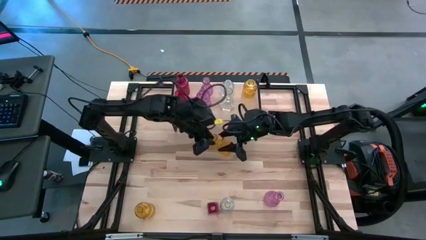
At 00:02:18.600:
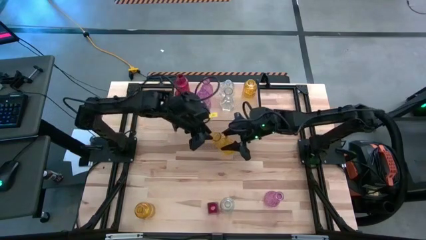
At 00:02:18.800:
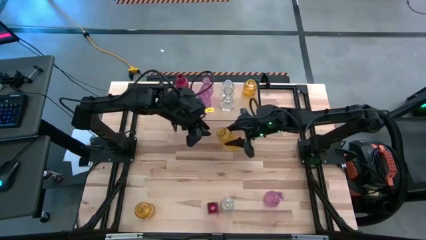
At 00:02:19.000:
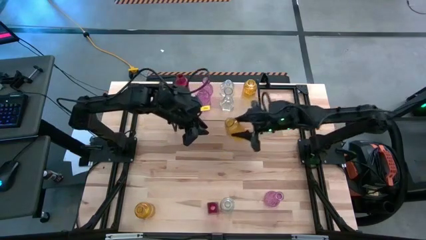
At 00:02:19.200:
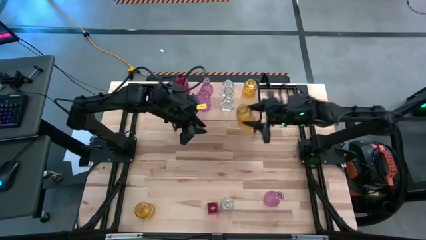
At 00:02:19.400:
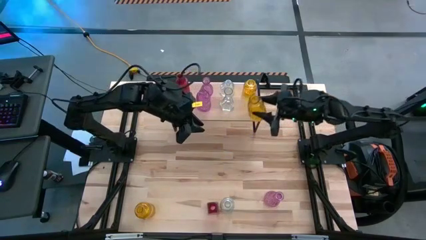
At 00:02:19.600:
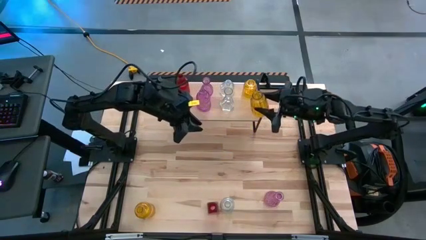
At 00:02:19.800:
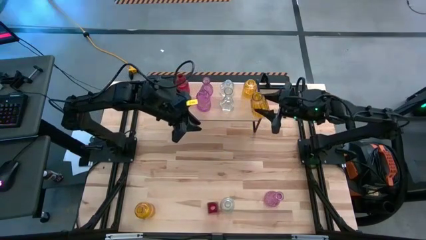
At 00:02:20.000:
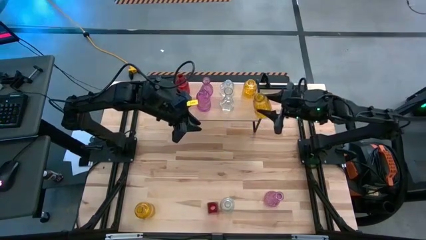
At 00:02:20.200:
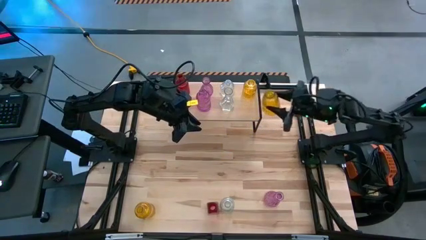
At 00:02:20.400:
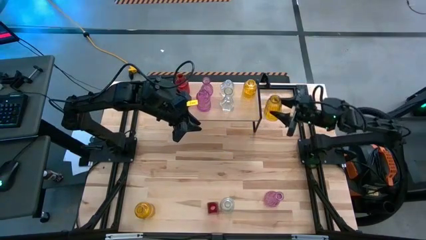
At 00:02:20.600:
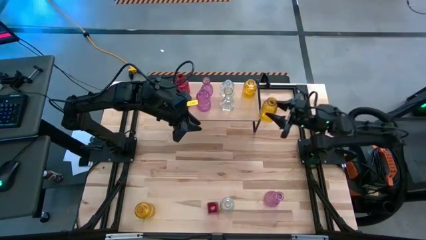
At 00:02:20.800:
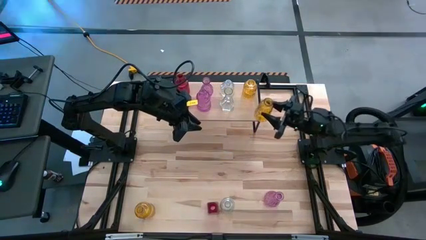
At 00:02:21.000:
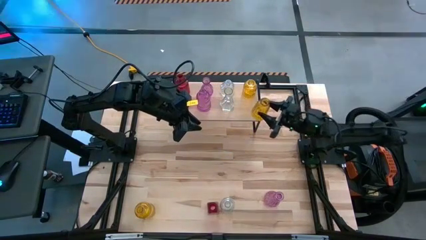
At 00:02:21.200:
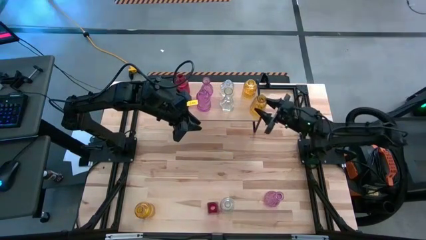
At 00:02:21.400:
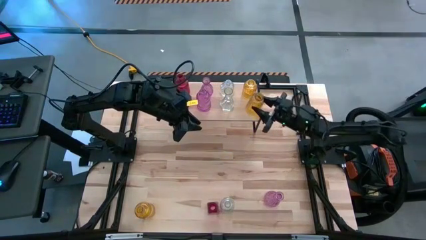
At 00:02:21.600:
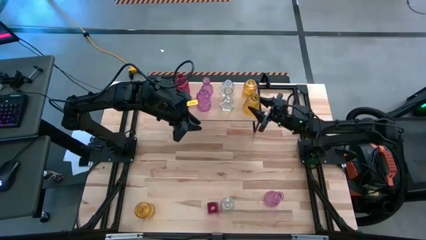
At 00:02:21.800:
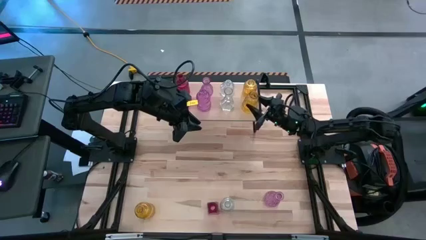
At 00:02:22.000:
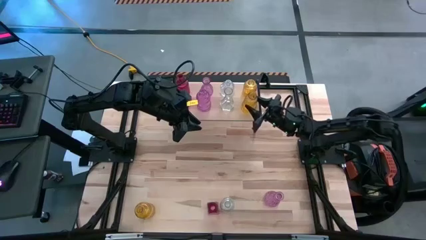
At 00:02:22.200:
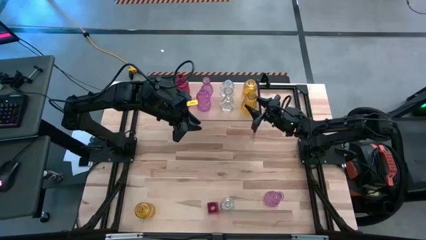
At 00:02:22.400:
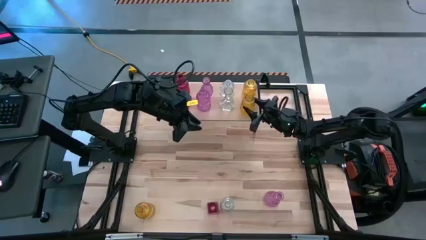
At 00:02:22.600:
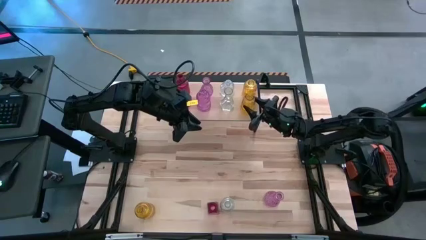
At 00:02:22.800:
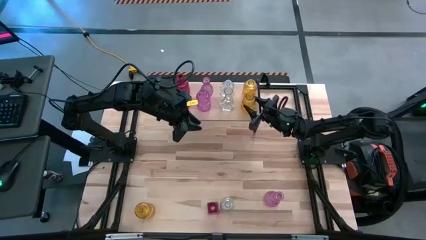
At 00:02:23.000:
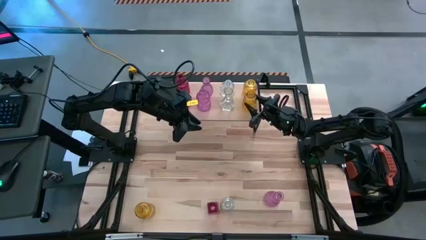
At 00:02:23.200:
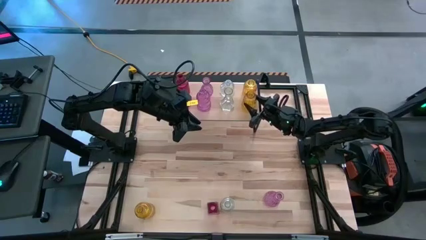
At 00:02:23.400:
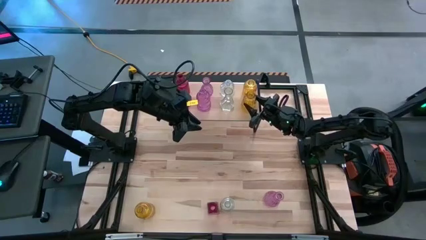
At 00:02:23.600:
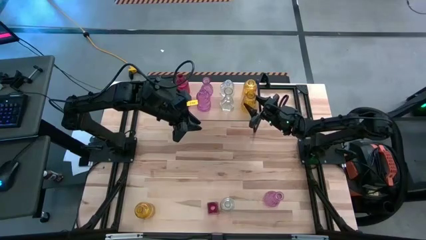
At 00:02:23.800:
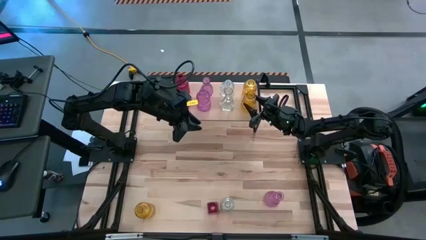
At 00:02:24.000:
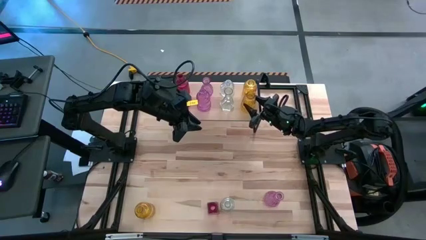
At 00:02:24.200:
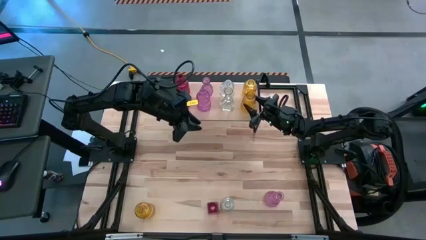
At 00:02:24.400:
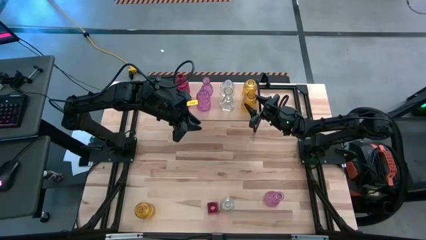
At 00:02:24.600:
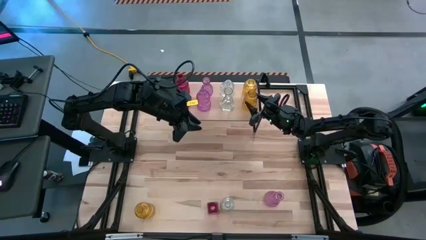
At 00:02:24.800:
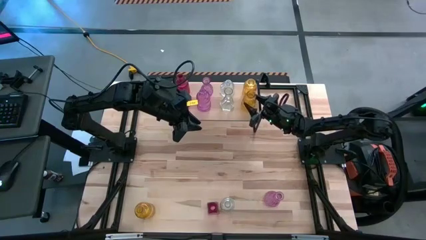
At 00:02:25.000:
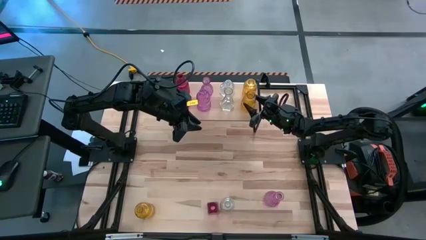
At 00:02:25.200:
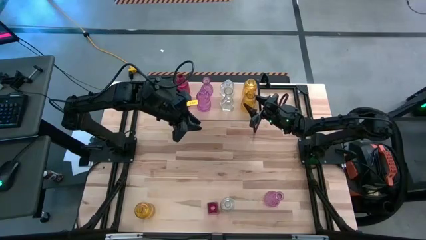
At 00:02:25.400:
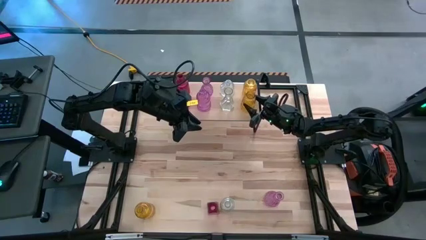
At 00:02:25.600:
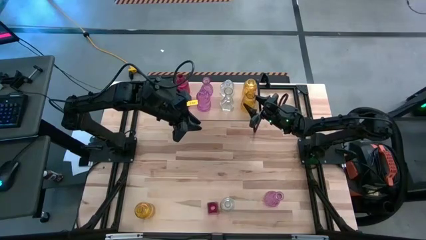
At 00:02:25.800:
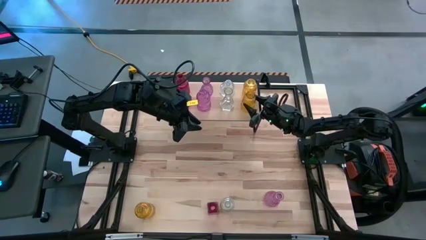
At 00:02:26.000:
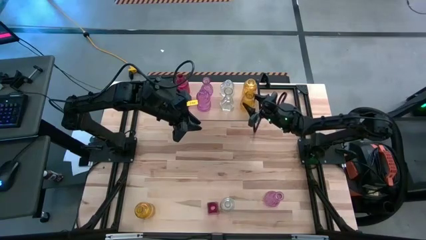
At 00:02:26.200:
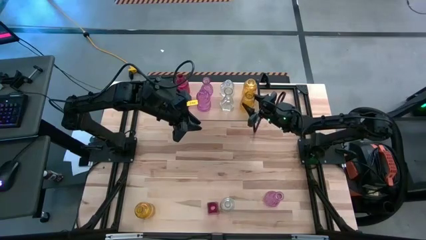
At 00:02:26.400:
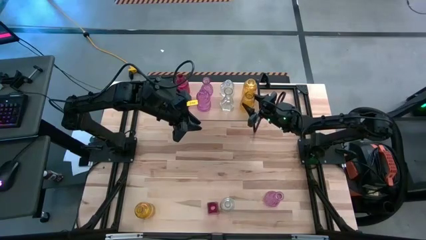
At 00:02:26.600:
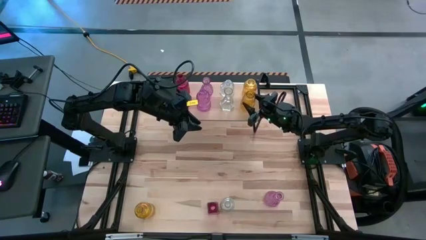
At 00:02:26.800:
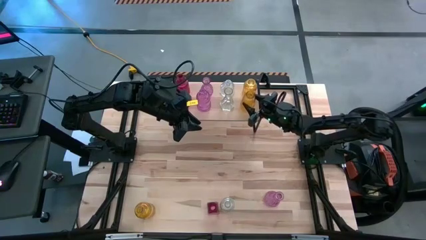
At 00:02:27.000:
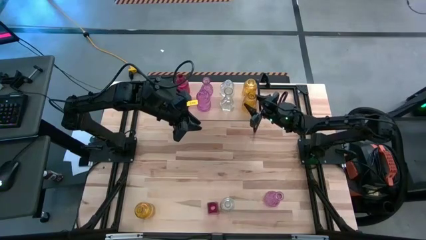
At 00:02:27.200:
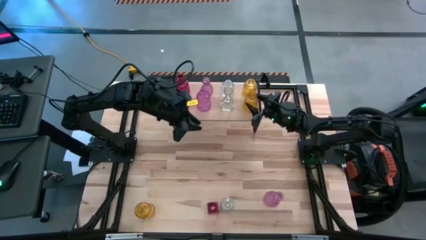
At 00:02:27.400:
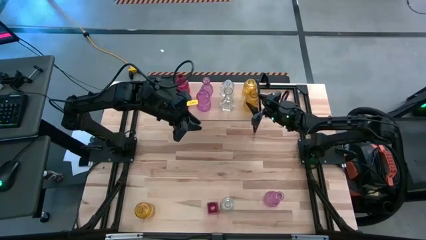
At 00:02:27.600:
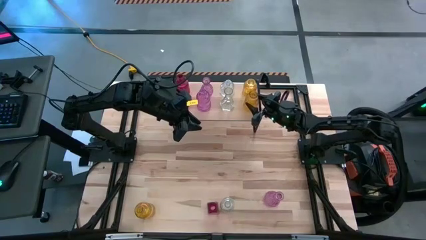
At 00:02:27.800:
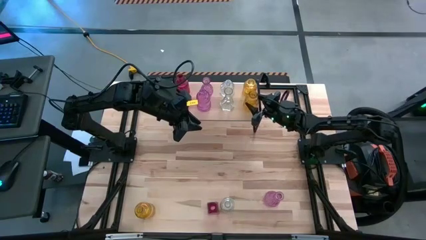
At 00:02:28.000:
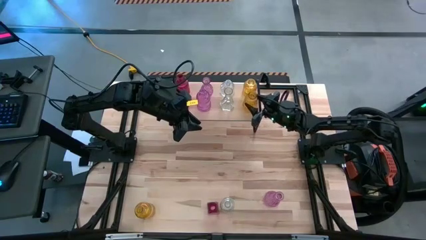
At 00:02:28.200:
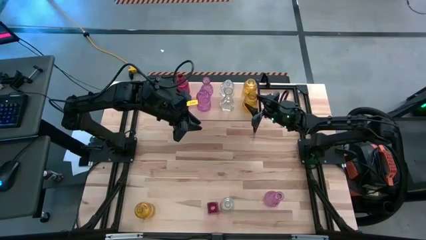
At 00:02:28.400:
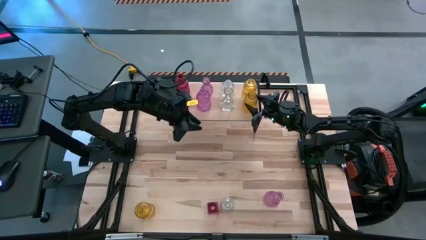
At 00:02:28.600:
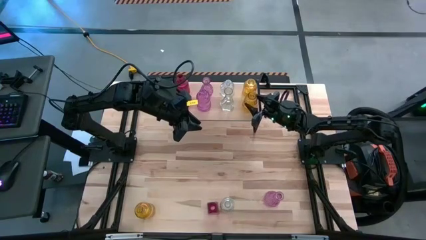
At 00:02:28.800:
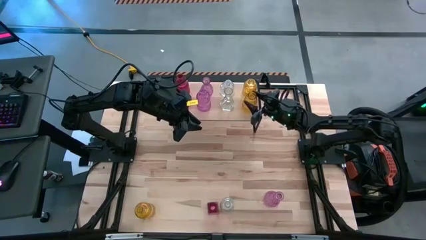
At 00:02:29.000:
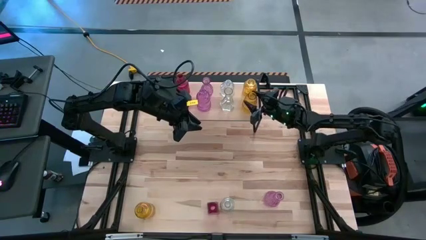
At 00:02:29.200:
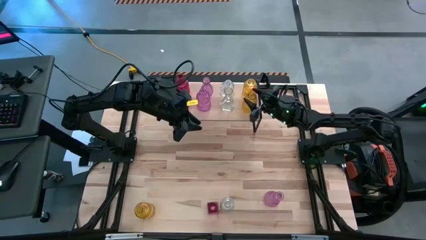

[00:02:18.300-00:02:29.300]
Task: sort vases onto shelf
Put the top yellow vase on the shelf aligned with the other yellow vase
